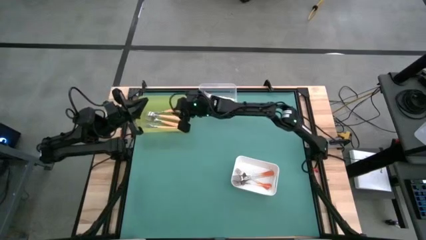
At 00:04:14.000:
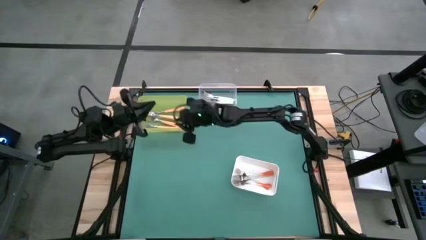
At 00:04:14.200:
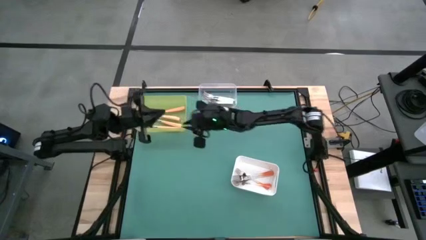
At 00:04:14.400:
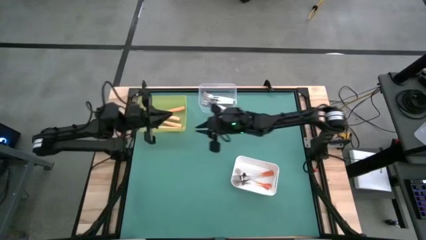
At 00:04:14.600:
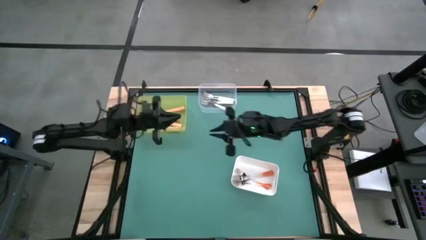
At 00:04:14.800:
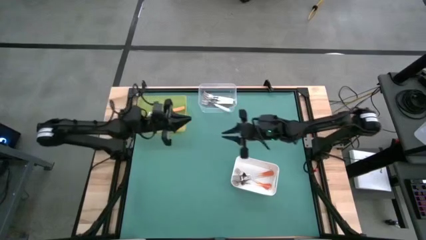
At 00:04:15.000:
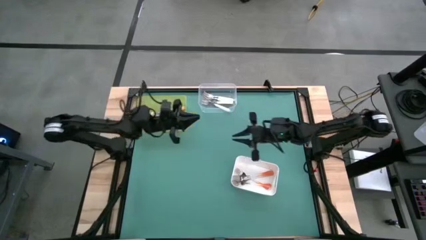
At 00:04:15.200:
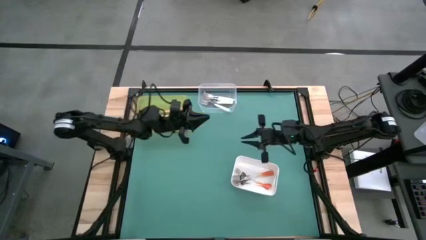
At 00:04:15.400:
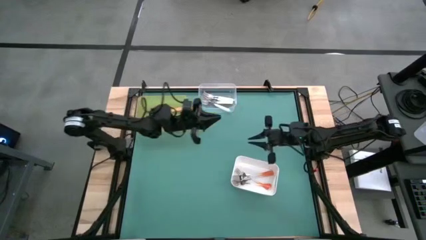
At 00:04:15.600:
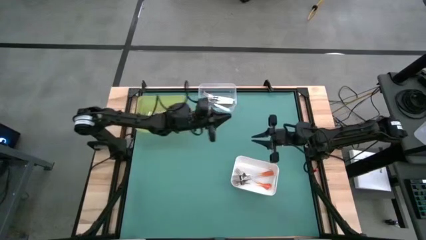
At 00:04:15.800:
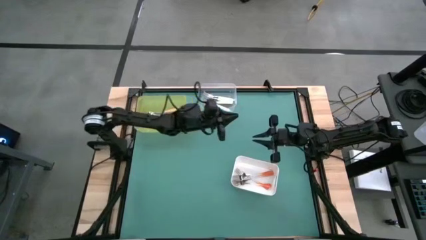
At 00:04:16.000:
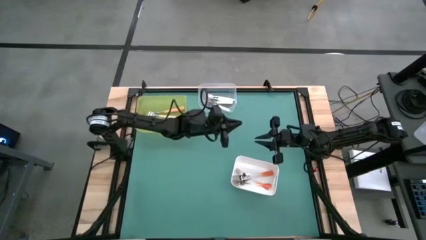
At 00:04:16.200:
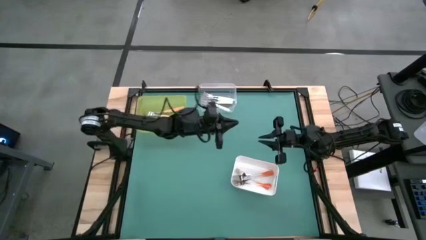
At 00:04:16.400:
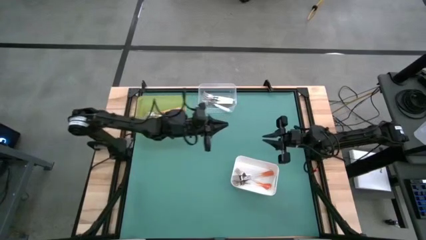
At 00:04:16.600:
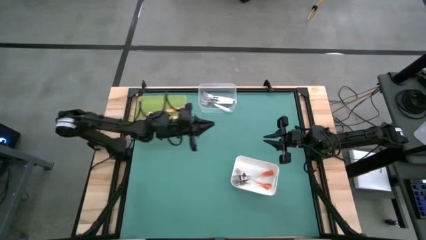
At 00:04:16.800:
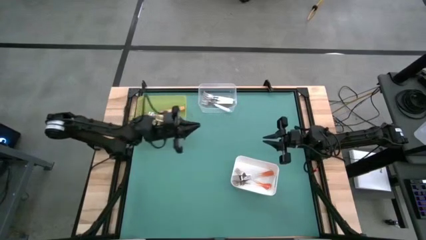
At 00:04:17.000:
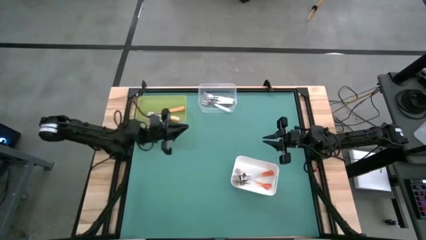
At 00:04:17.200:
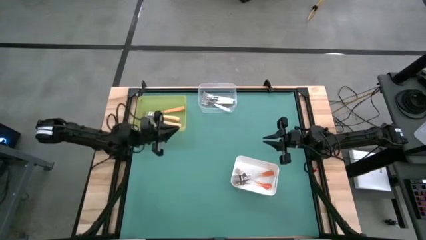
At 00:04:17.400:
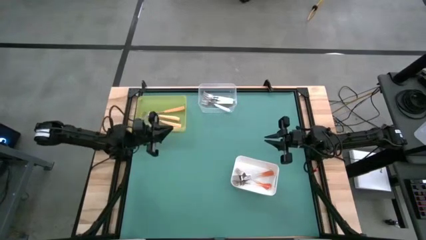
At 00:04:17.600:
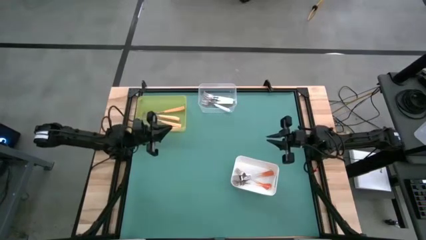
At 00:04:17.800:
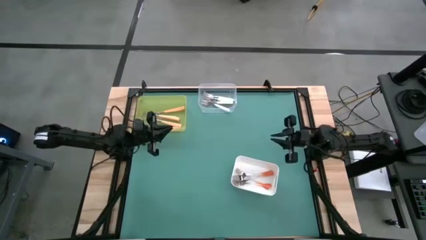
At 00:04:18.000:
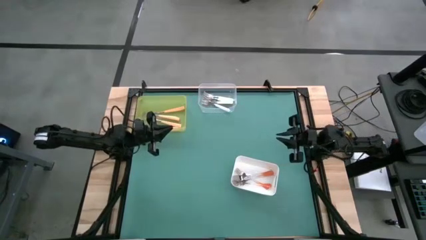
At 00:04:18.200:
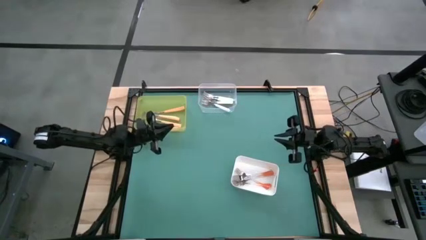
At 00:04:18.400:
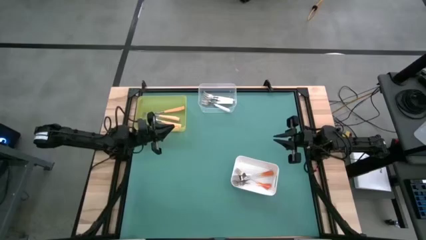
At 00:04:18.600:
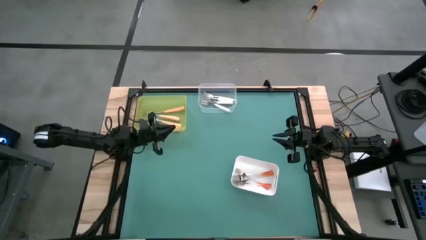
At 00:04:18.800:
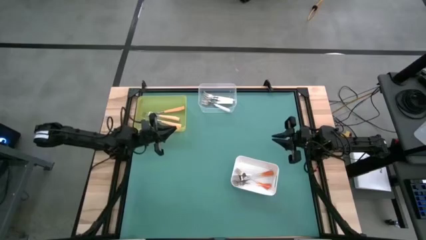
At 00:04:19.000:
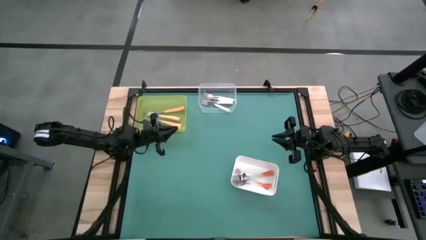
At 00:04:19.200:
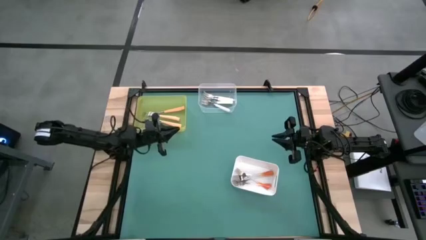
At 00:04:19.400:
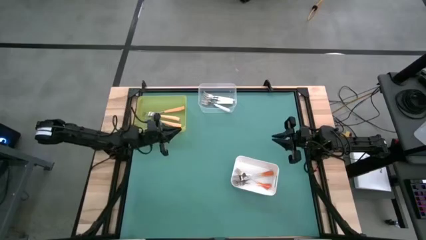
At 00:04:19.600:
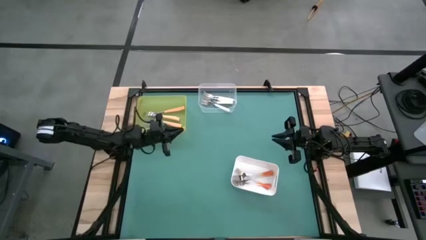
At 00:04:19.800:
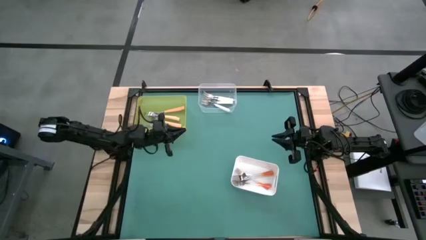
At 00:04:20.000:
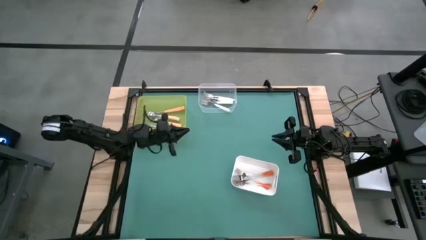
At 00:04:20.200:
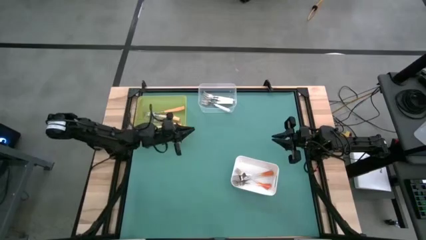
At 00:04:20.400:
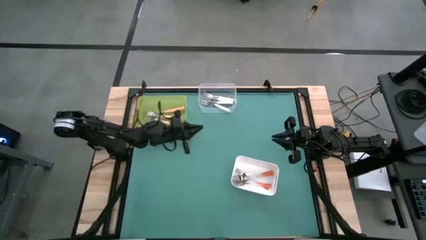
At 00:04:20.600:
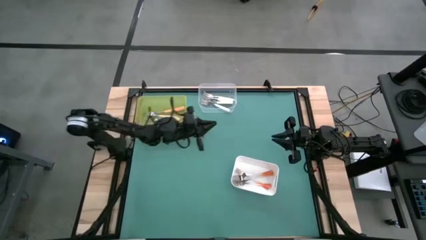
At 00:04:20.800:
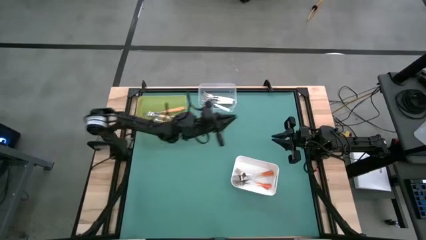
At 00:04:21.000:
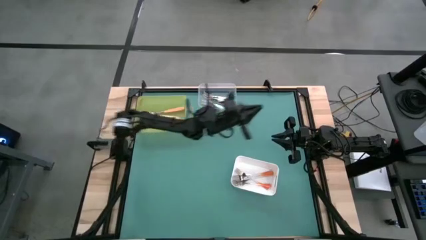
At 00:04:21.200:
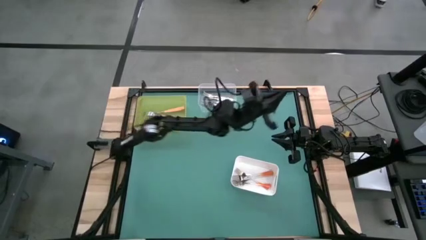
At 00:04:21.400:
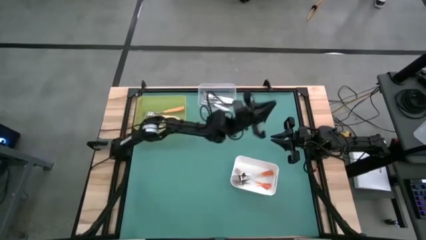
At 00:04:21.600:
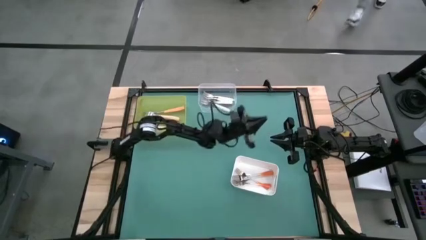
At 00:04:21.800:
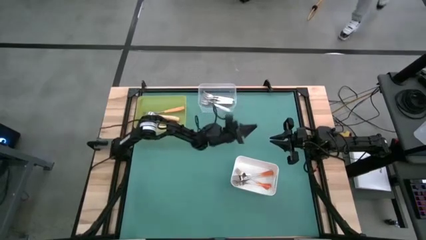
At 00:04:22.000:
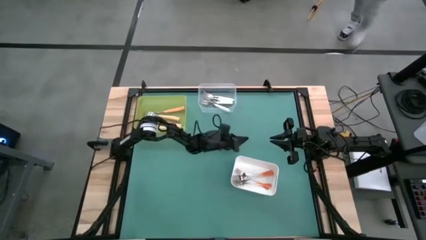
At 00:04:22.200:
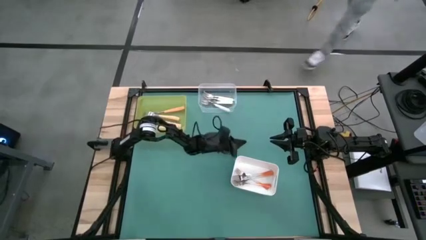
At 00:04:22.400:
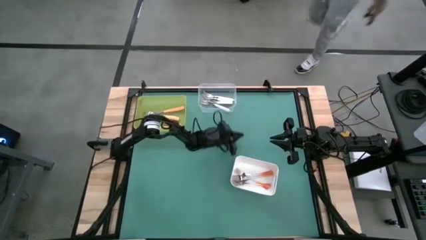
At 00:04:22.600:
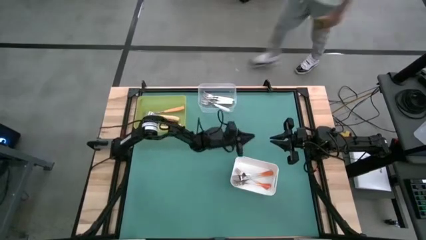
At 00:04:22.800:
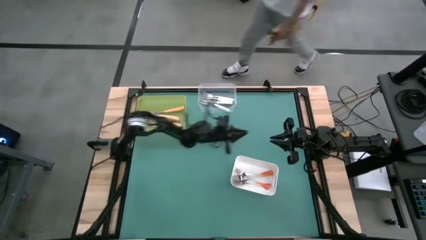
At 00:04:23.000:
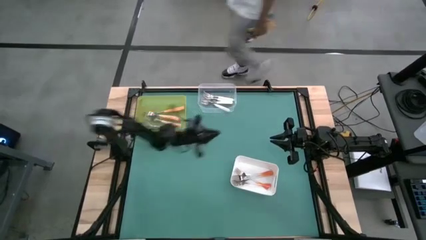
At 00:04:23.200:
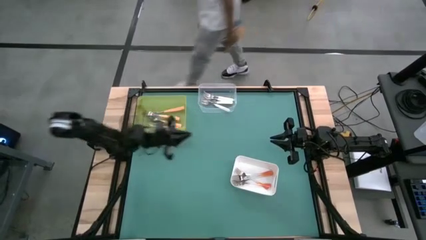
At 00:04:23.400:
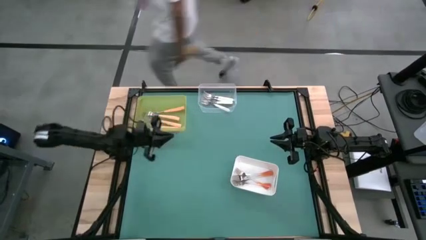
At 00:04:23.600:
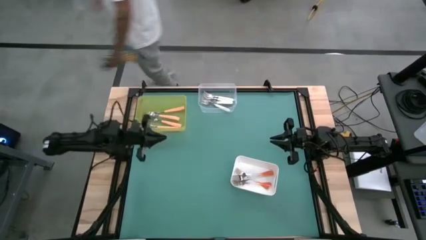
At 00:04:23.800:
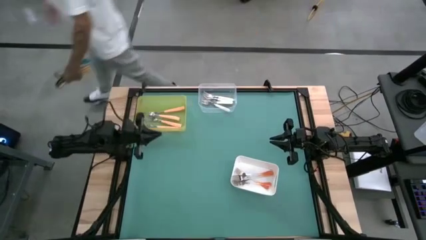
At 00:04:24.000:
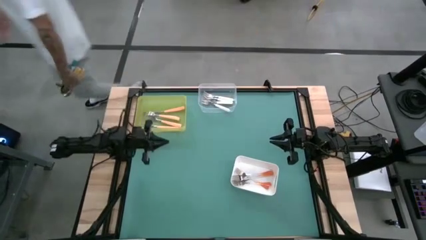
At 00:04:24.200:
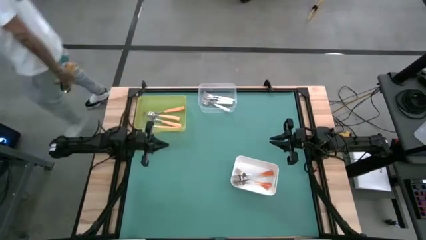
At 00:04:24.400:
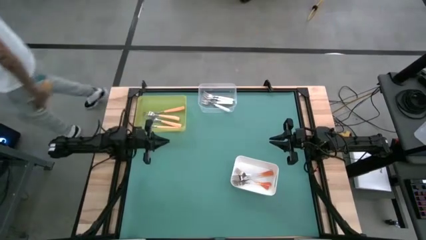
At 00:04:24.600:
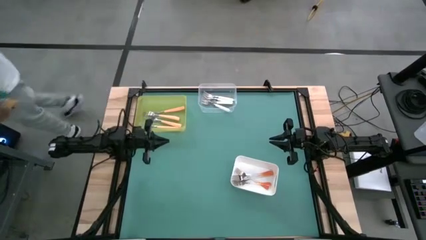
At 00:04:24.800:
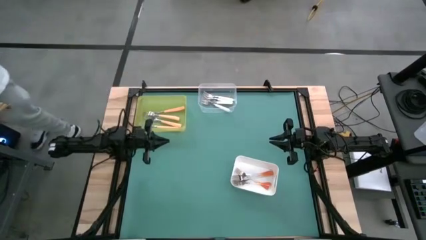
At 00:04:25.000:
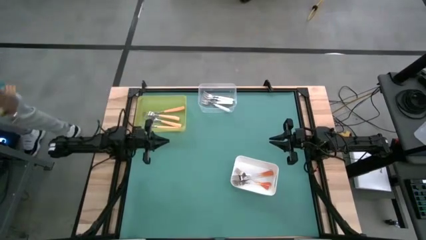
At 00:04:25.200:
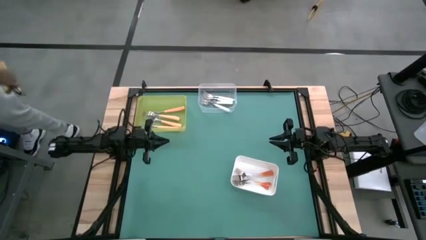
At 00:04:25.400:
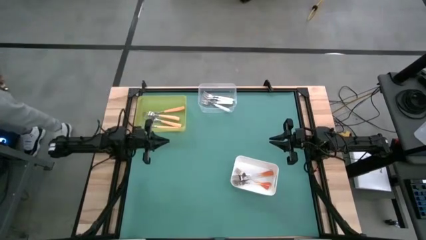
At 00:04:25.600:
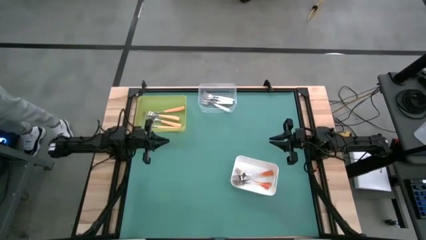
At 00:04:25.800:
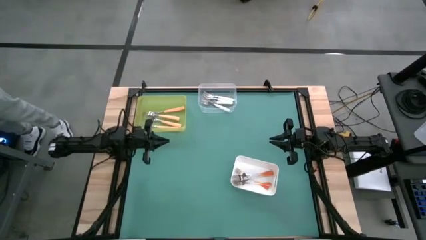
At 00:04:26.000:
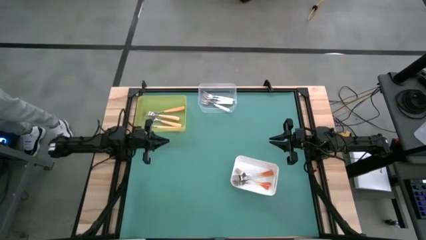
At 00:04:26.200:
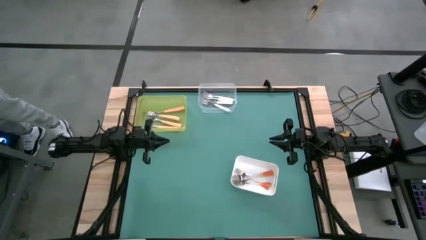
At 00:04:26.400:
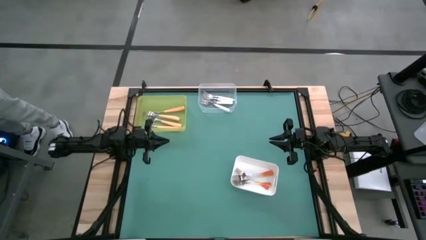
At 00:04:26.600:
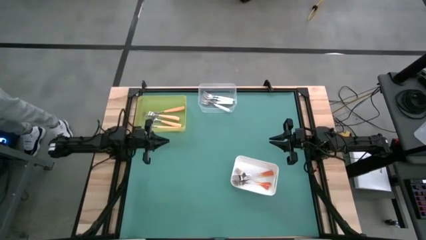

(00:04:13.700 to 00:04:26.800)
Task: Sort silverware by color (type)
Return to Home Position

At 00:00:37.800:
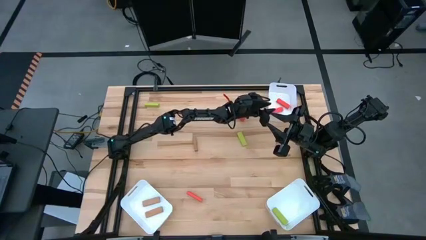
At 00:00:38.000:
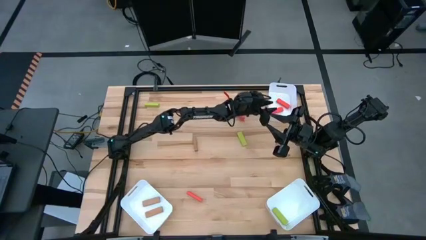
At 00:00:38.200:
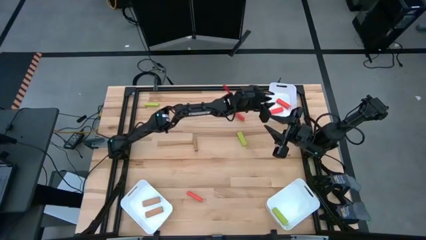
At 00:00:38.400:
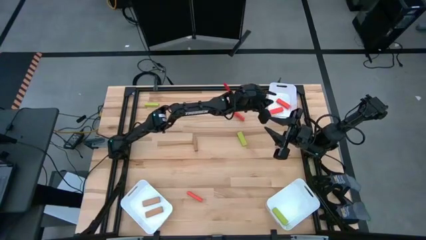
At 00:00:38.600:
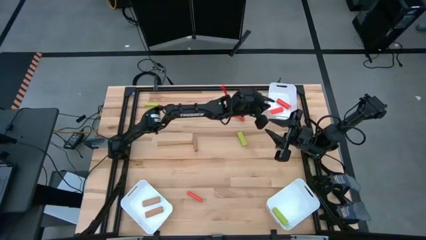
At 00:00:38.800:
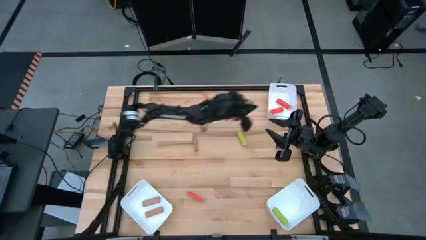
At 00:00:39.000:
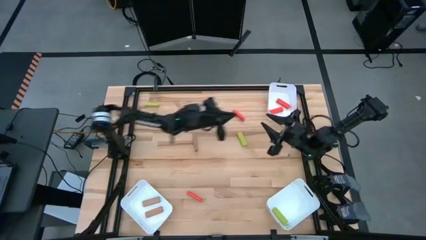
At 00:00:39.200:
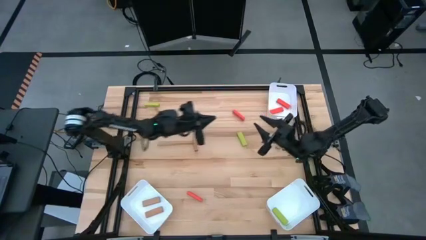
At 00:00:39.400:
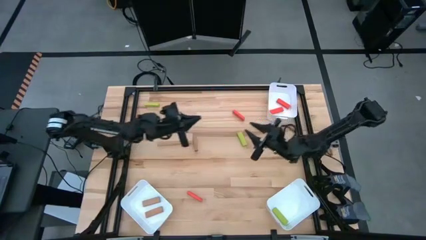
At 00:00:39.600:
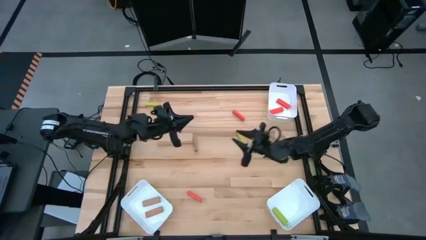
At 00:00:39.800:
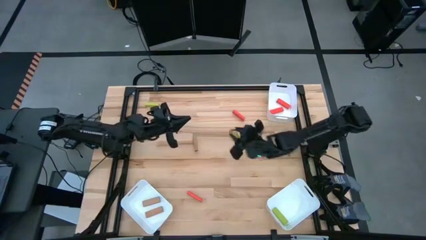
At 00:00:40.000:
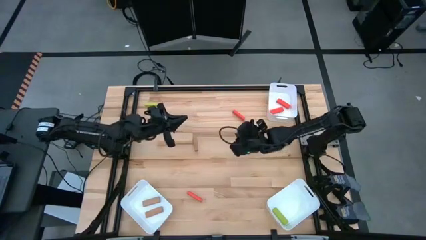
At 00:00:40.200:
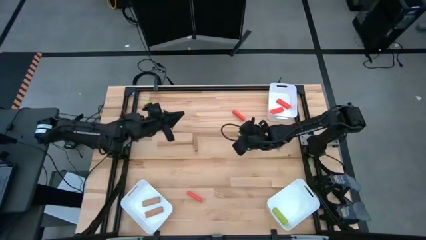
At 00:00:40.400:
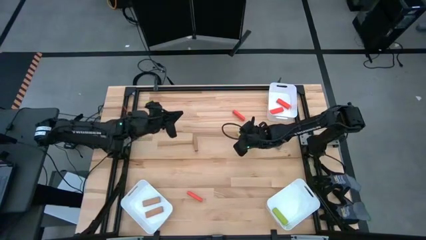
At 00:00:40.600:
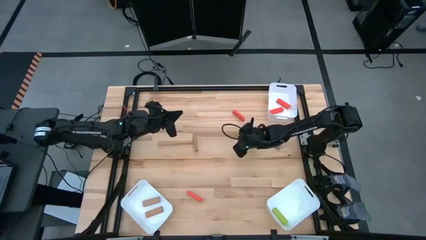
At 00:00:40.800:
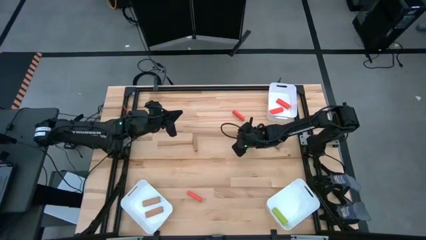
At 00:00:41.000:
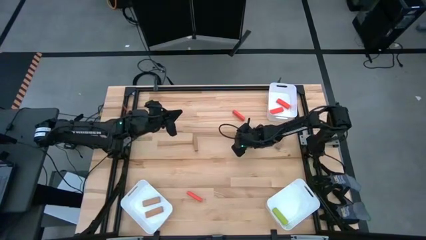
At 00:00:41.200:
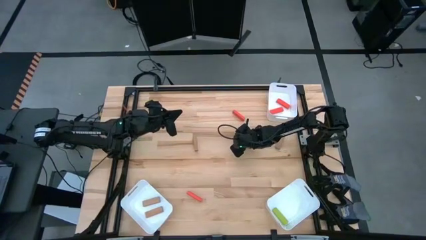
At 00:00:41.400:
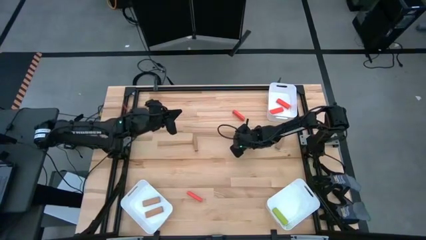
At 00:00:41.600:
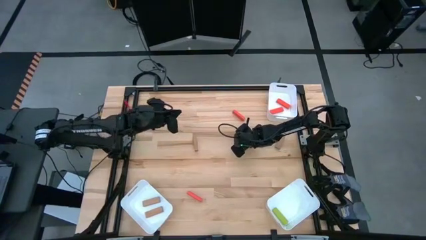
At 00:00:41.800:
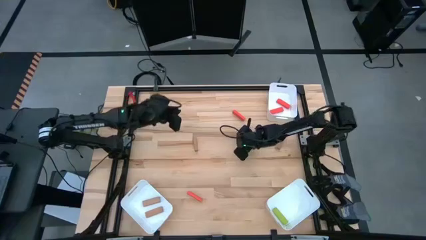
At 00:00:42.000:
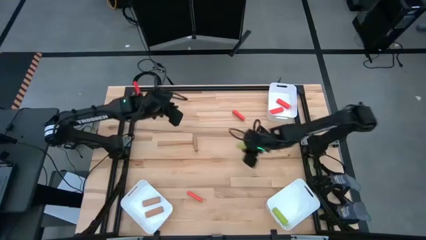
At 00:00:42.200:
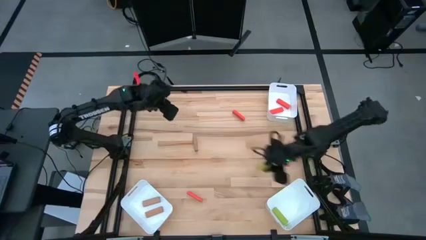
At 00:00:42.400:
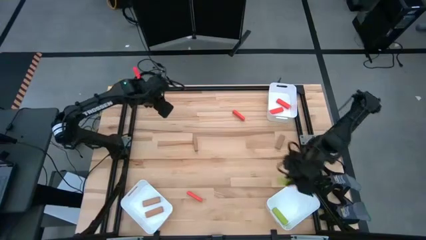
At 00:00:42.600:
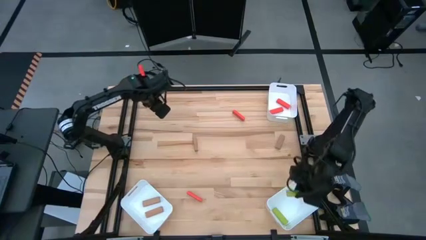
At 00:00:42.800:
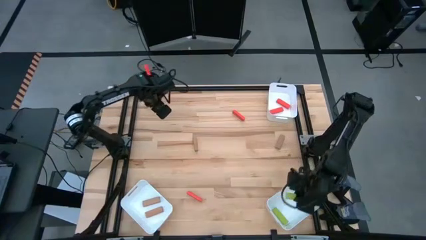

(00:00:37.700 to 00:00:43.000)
Task: Sort blocks
Put the bottom green block into the bottom right bin
